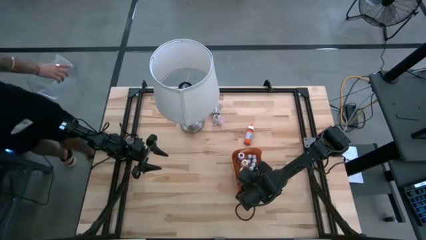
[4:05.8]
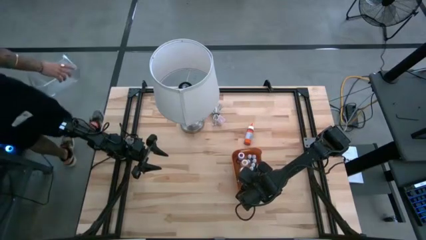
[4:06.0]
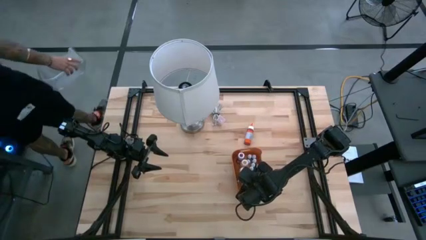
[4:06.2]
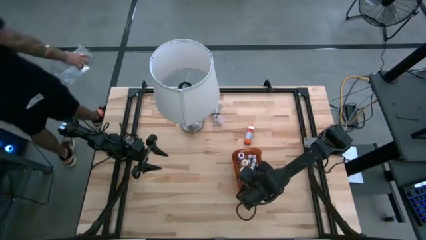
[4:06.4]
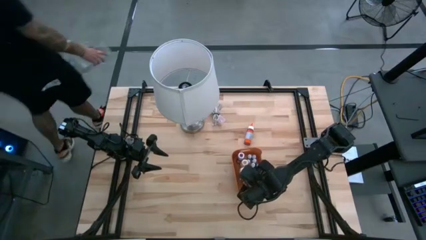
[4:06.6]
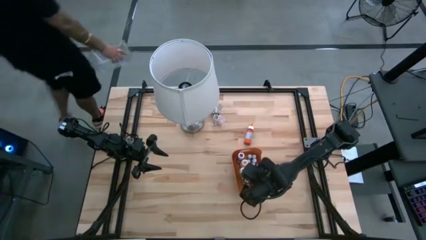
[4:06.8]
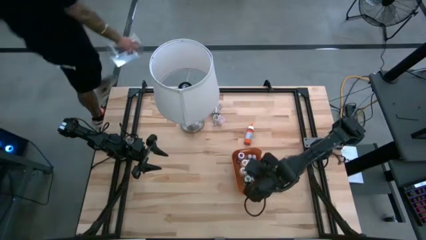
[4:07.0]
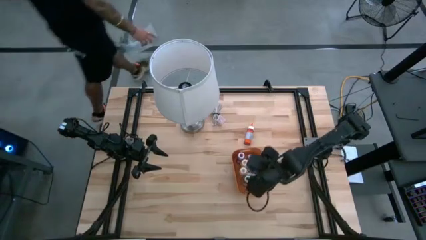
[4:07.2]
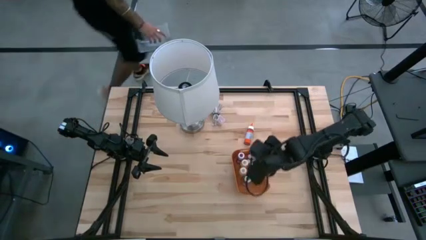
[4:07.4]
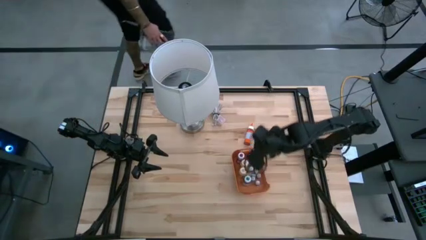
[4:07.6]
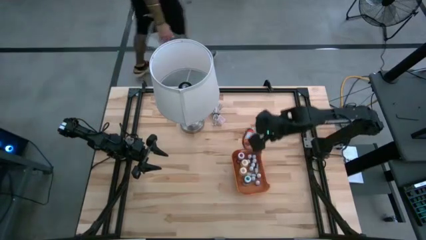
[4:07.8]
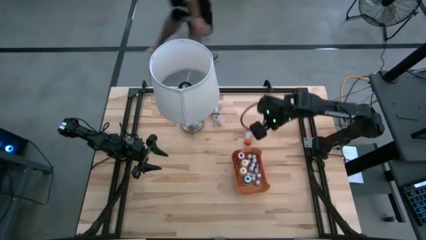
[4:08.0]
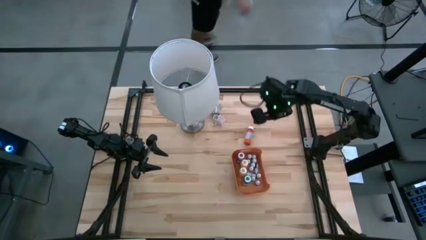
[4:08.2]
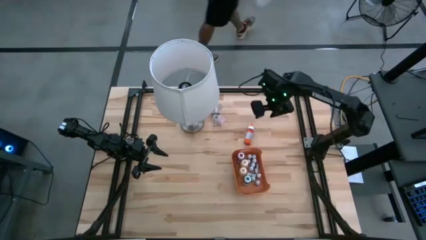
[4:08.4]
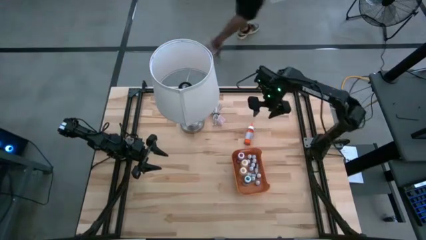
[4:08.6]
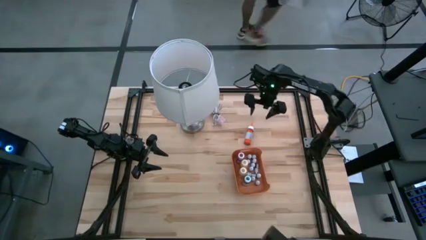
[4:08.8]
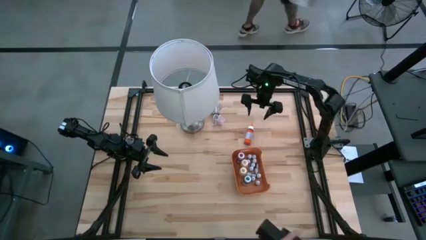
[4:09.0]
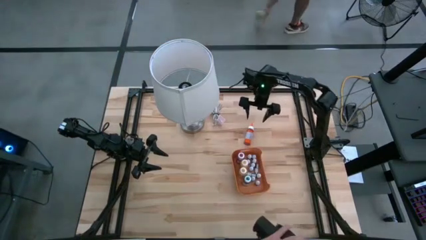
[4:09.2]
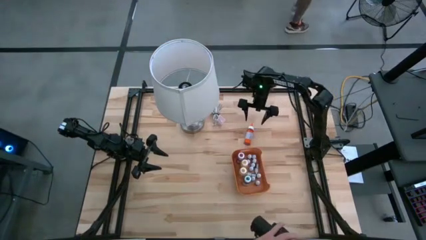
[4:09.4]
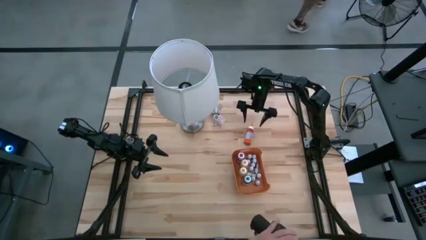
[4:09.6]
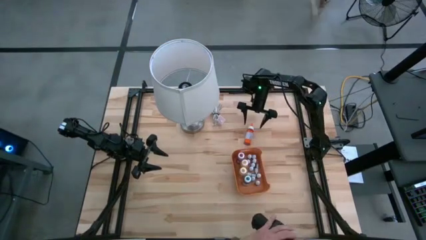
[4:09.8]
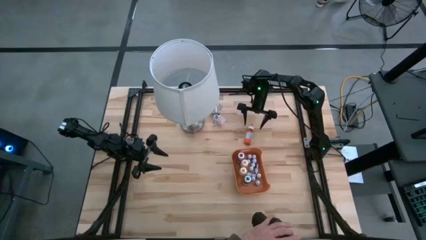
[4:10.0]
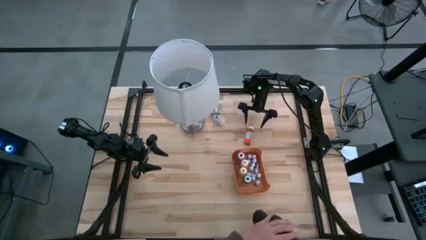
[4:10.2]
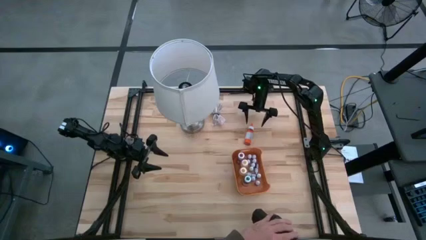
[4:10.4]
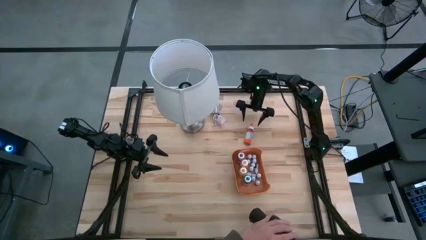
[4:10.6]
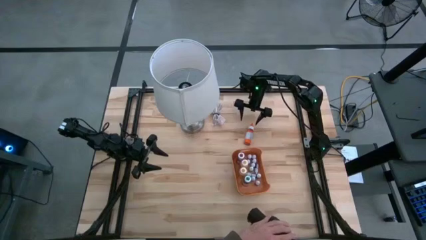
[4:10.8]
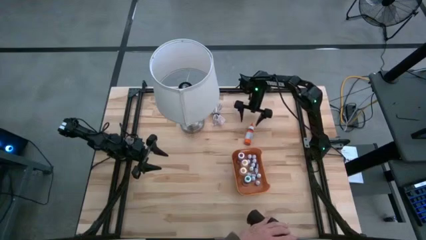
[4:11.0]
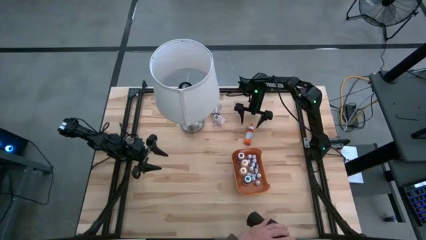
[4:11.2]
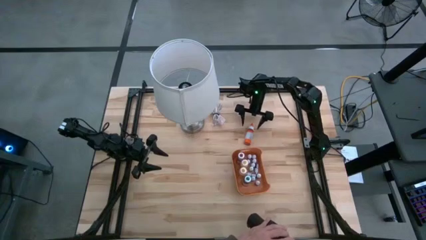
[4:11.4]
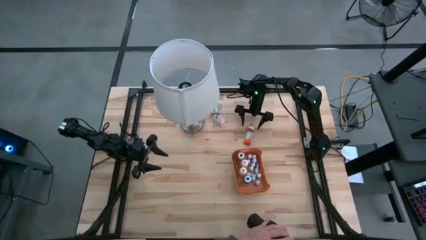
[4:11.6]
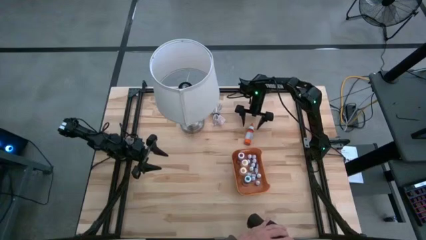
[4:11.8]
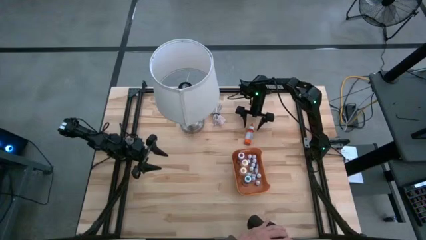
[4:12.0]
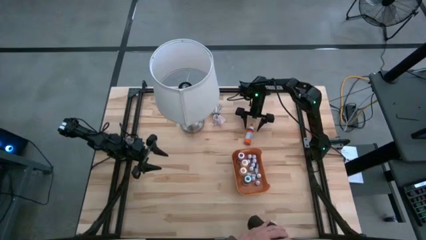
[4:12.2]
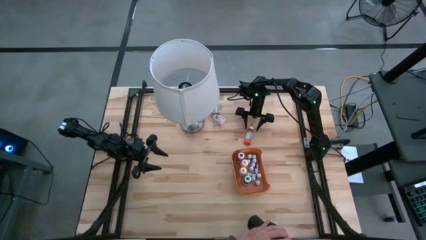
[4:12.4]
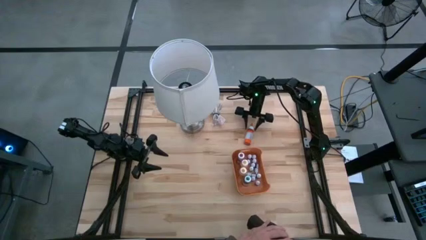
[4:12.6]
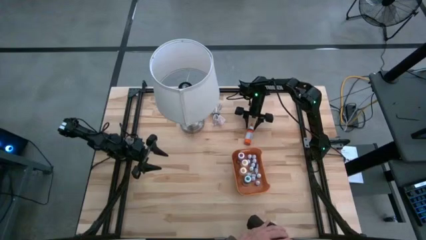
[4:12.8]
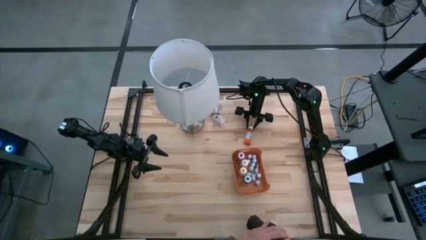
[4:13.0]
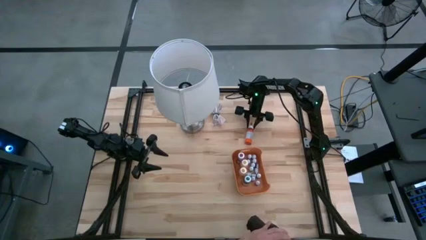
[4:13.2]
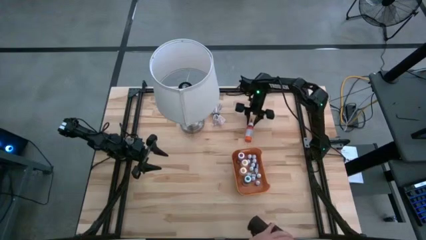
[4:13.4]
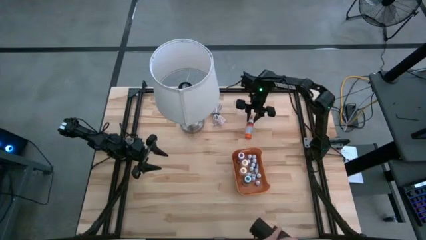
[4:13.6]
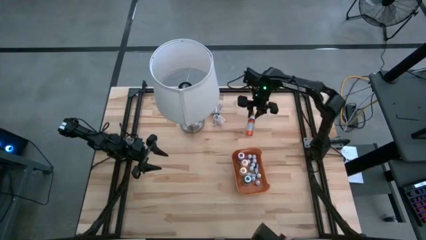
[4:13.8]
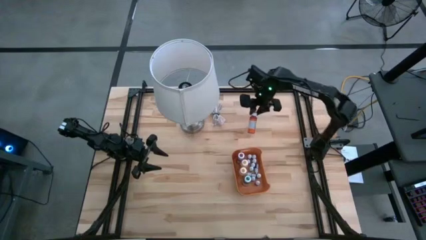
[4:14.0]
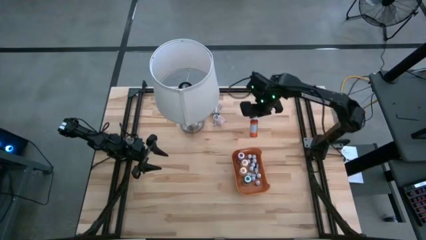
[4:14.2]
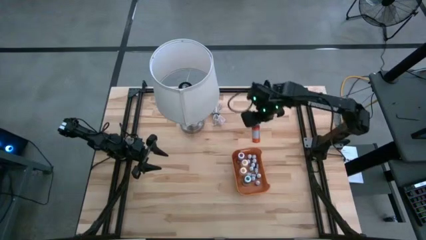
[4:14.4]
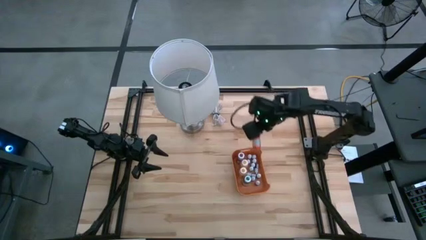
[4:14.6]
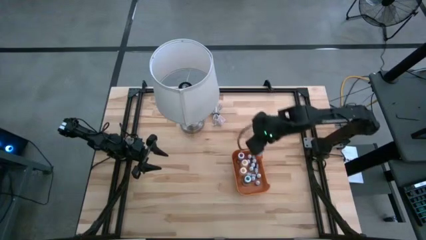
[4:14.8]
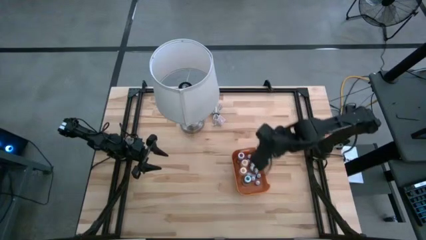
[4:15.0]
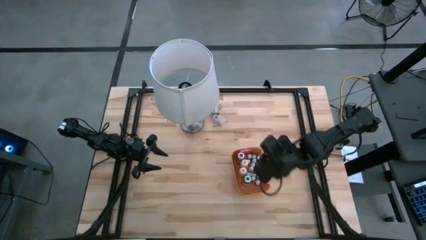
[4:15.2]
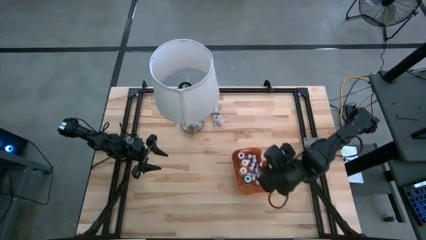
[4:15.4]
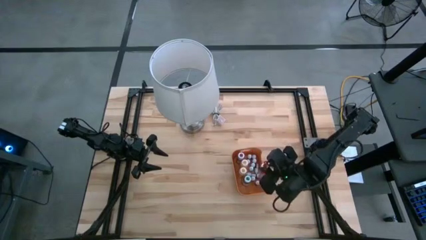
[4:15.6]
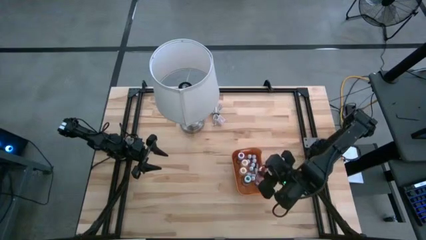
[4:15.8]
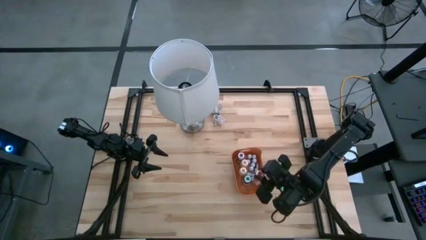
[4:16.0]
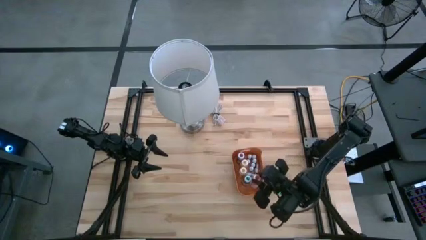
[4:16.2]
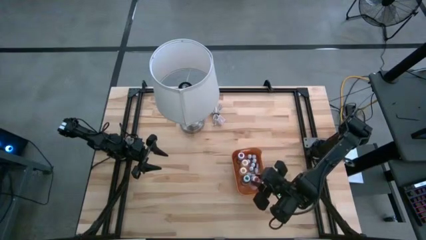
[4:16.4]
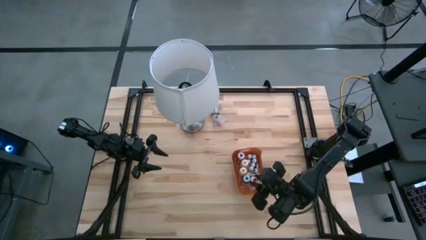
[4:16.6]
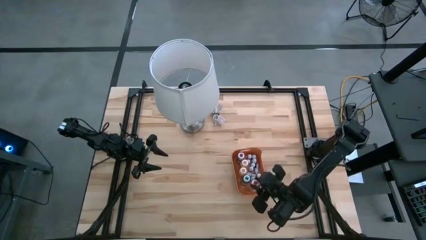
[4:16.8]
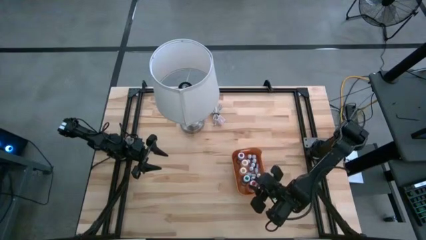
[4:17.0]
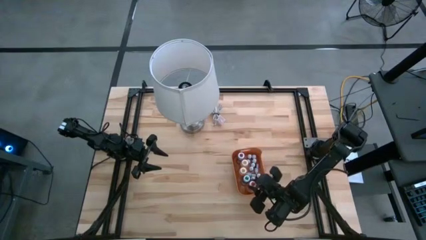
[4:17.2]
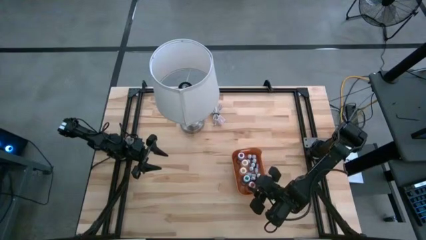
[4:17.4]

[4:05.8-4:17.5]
Task: Pick & Place food coloring
Put the big food coloring bottle into the orange bin

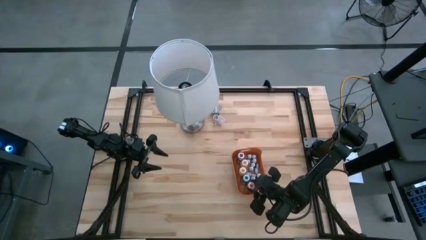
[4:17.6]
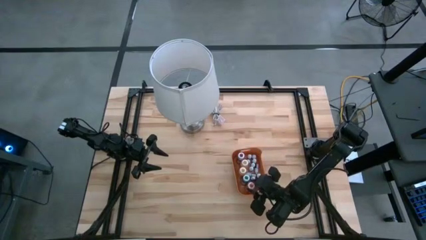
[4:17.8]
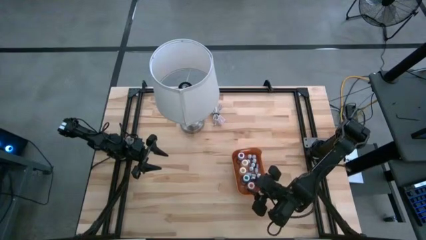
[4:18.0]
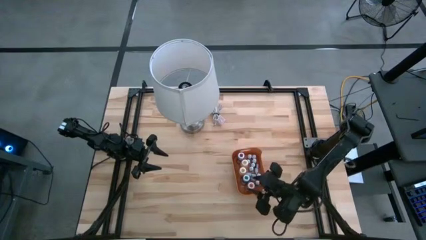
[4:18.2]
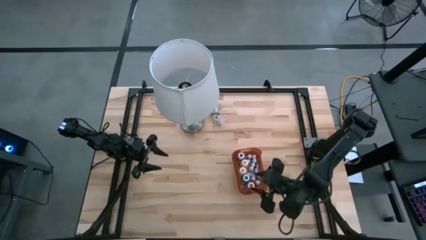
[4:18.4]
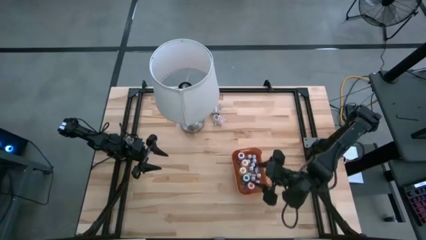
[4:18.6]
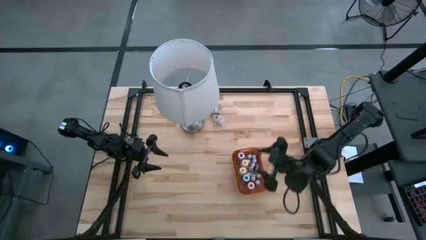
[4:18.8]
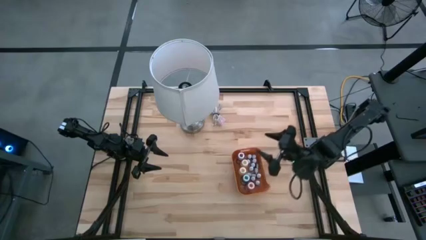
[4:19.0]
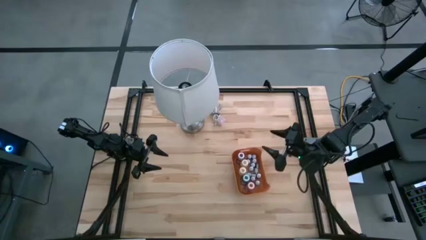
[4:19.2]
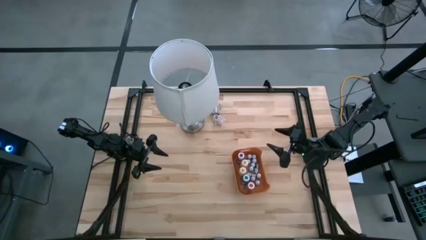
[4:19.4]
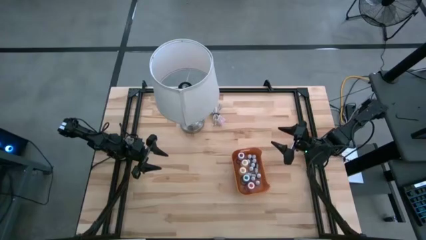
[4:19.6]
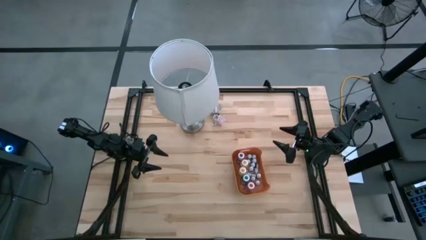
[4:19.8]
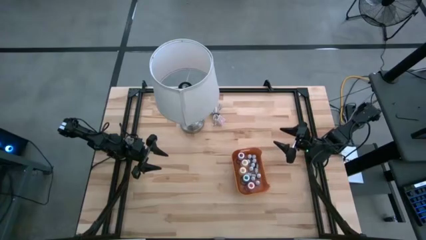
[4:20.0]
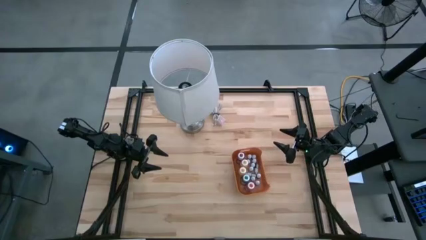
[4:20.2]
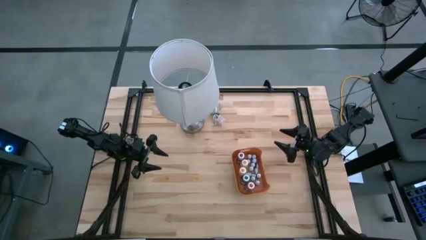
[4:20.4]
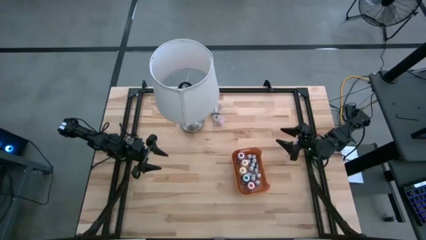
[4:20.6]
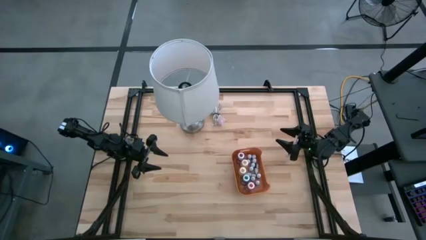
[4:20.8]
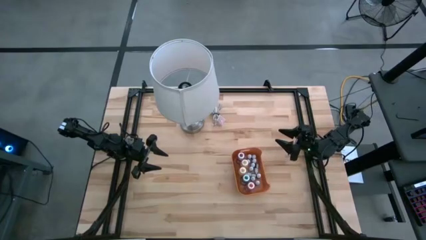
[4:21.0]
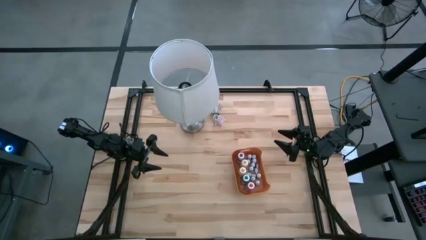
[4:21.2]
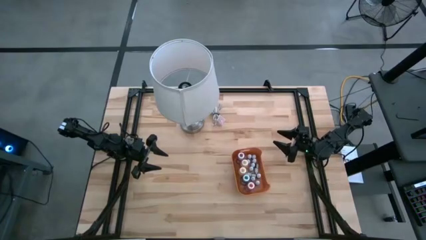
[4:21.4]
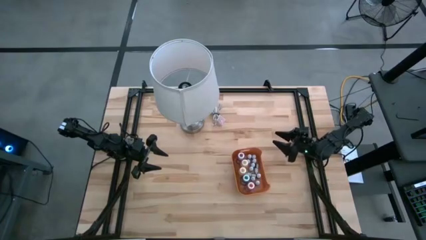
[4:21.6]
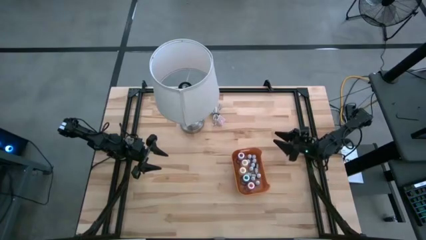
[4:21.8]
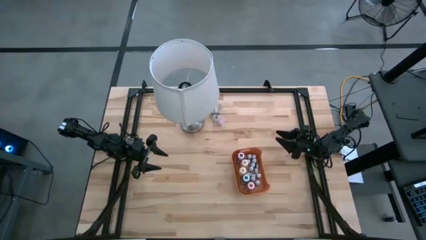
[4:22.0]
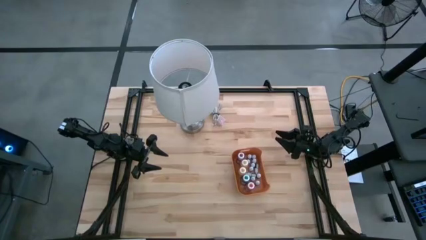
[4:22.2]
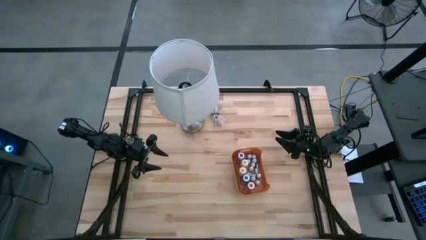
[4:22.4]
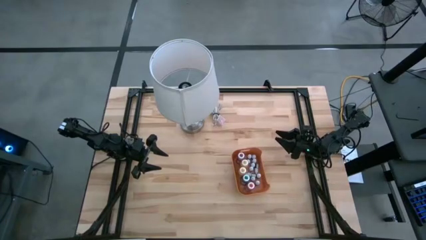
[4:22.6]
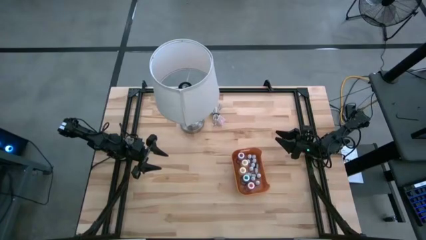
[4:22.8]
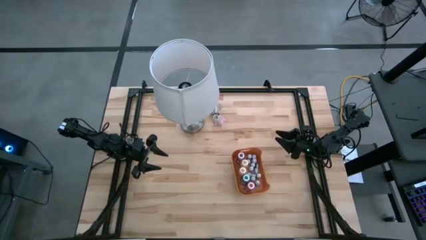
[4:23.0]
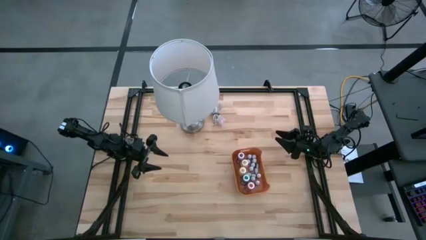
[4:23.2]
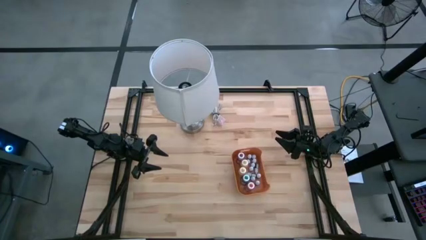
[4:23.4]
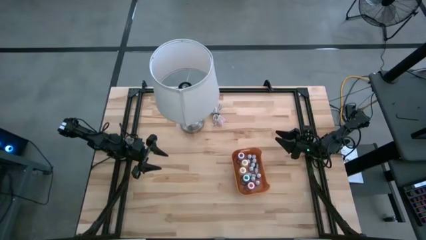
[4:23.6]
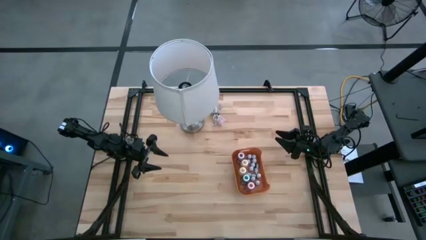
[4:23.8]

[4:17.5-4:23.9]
Return to Home Position
